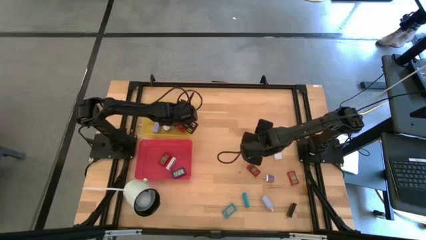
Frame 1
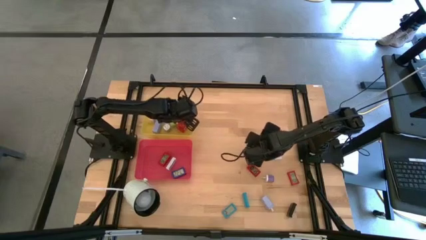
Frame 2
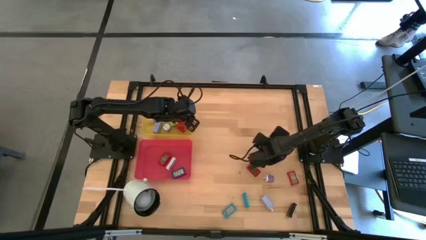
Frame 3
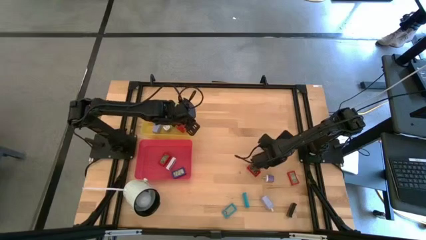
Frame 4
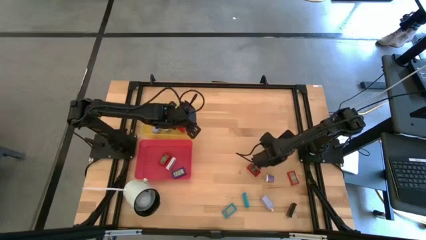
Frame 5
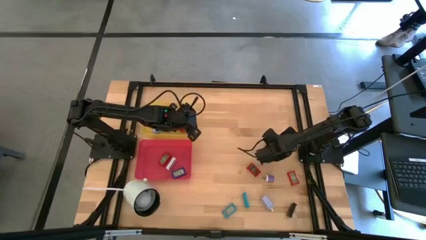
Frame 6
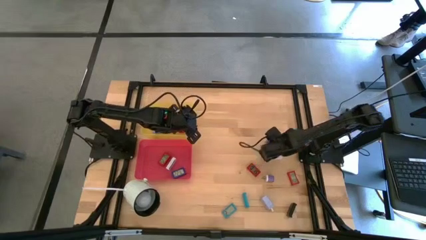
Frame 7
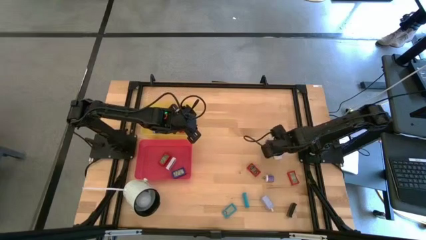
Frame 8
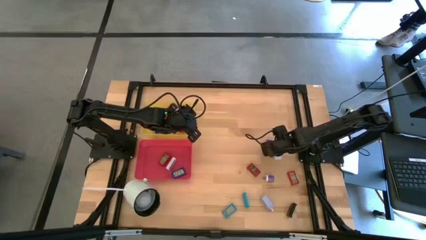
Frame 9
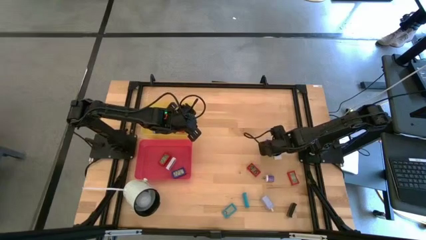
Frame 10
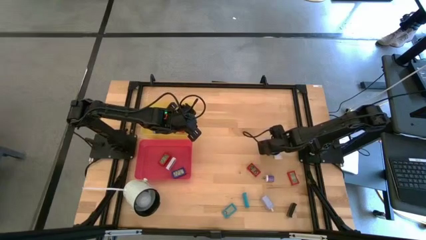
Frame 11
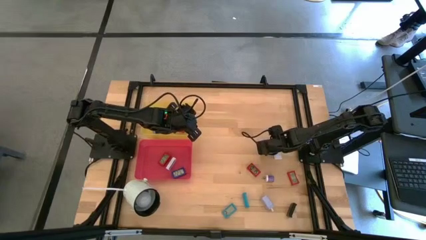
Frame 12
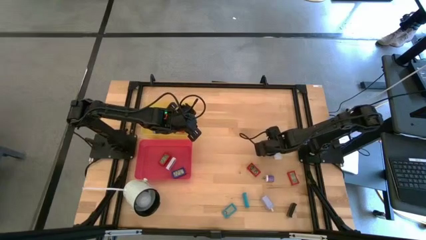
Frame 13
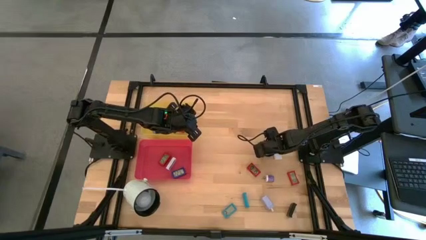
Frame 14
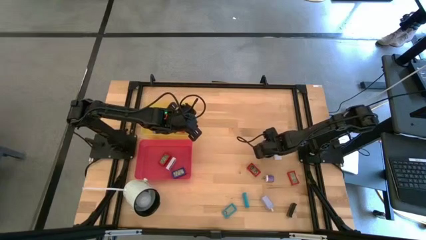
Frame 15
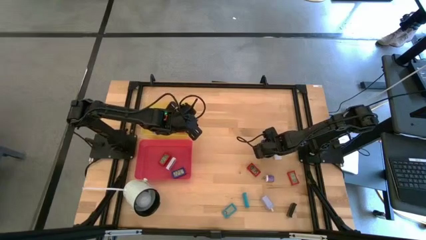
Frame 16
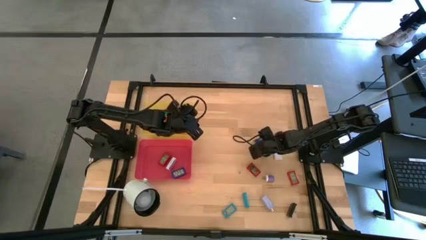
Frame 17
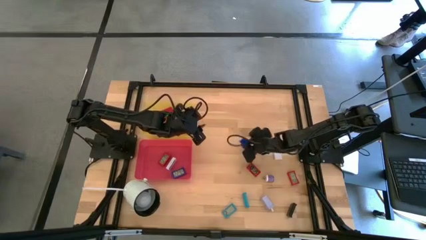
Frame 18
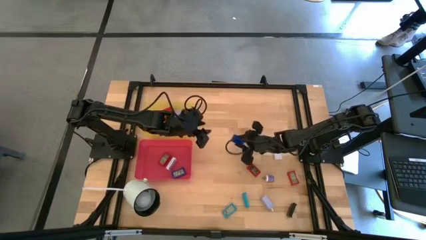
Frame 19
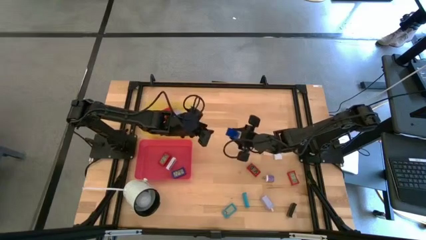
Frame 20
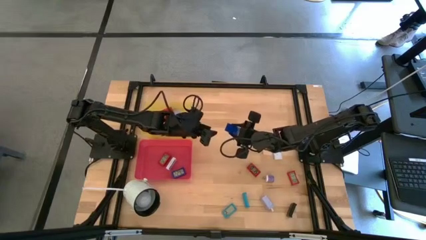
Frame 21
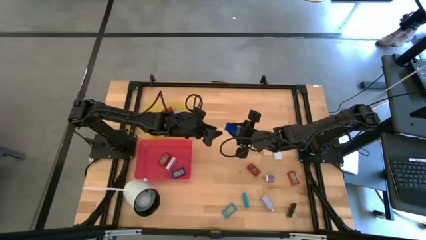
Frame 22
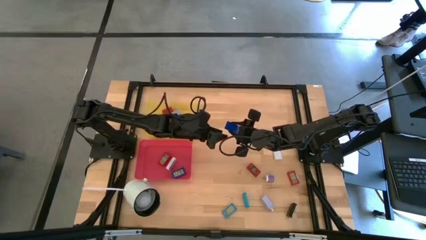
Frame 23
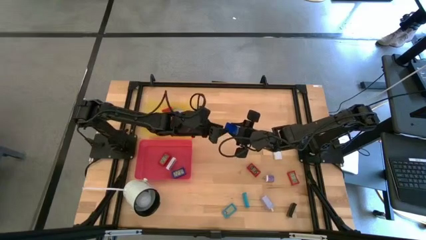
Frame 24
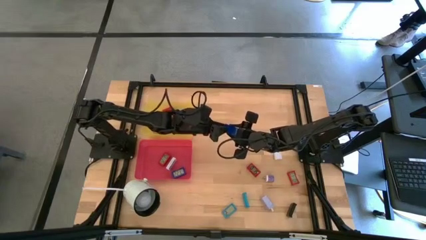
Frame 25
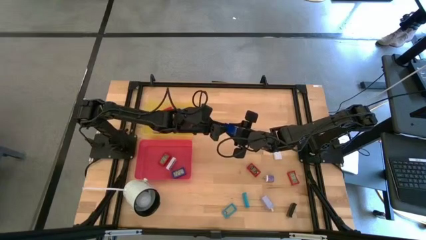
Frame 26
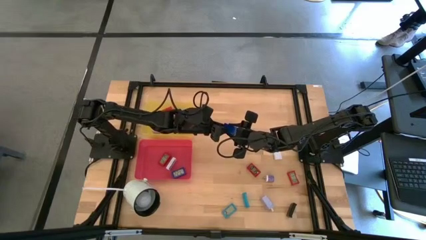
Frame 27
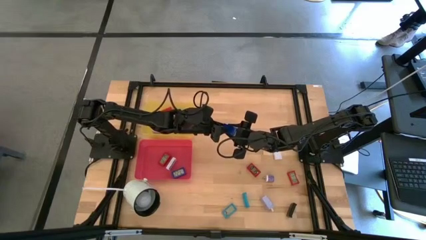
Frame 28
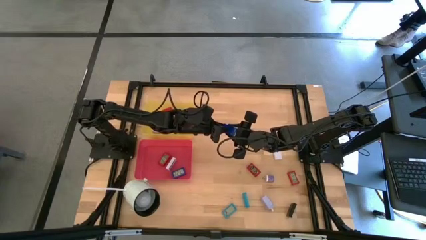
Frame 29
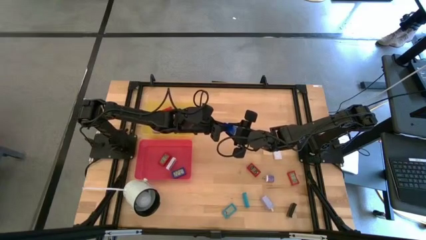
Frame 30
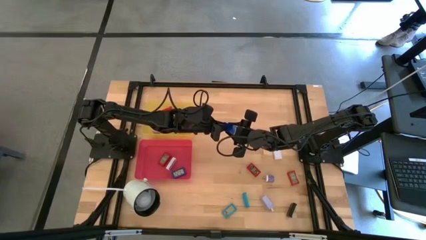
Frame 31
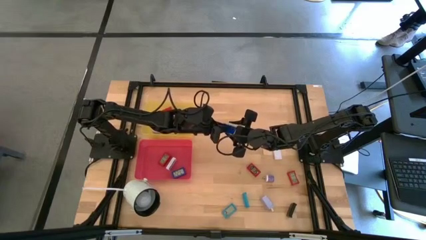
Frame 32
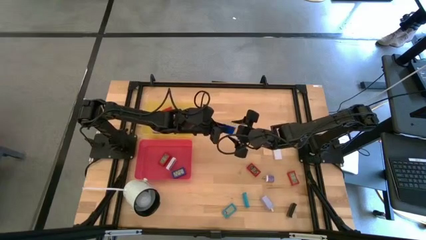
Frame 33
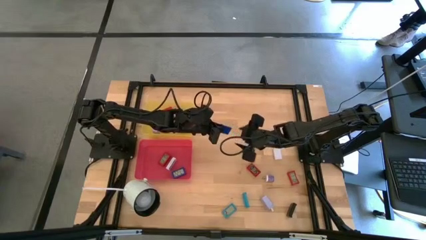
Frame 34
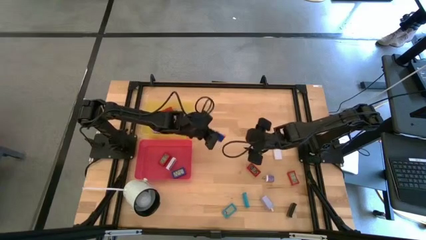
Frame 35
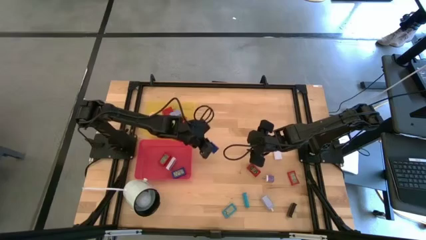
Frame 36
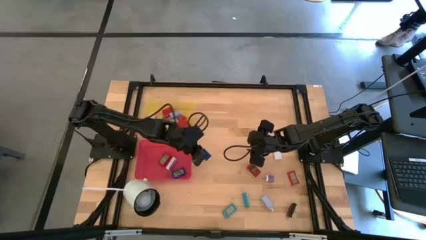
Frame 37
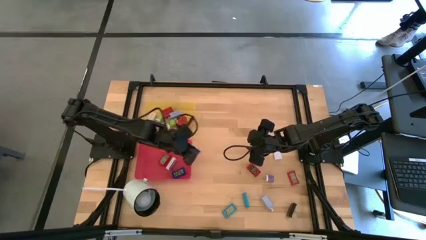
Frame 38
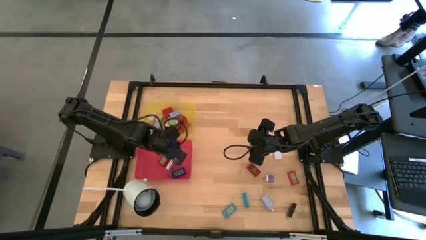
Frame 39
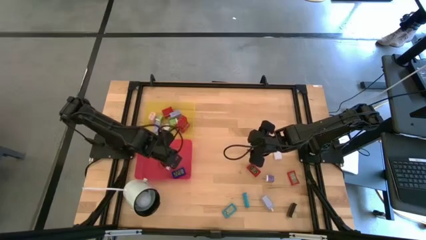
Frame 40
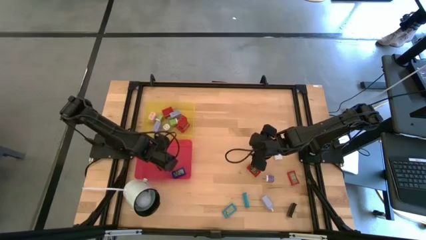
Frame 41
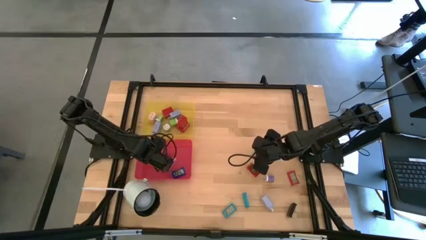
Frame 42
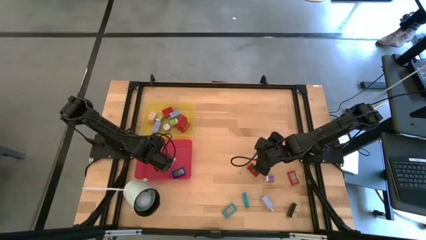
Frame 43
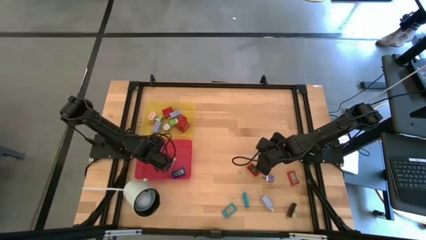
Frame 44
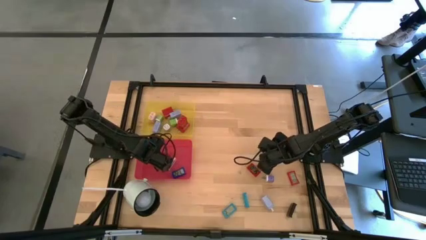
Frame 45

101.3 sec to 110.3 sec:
Task: Pick & Place Office items
Put the blue timer into the red bin

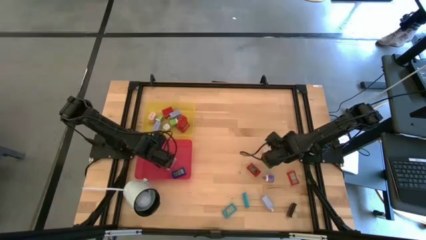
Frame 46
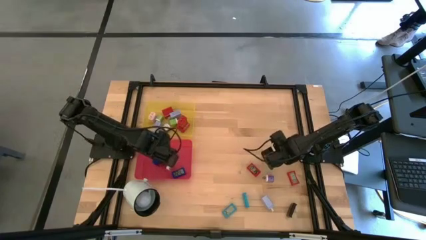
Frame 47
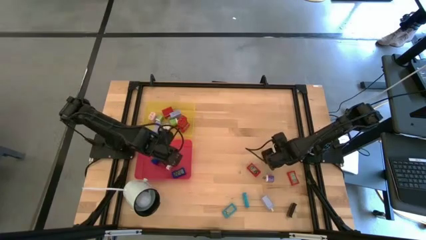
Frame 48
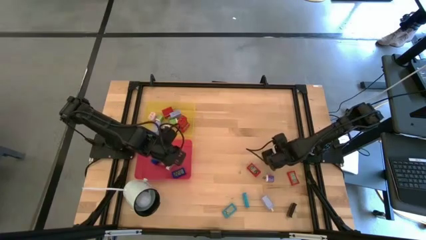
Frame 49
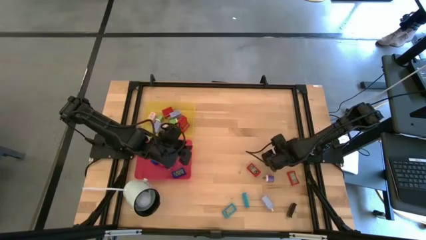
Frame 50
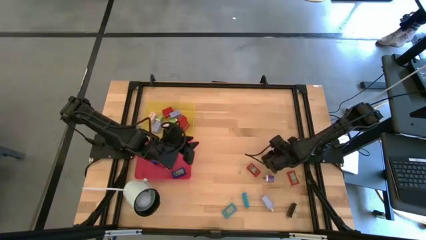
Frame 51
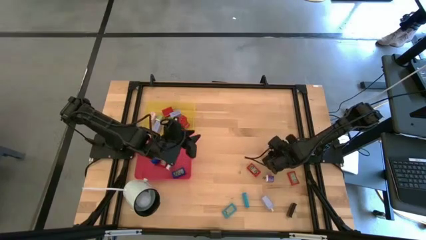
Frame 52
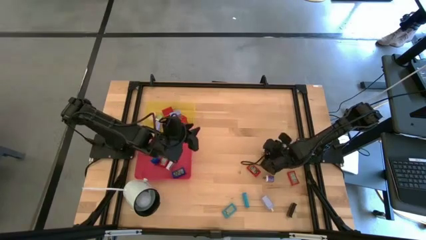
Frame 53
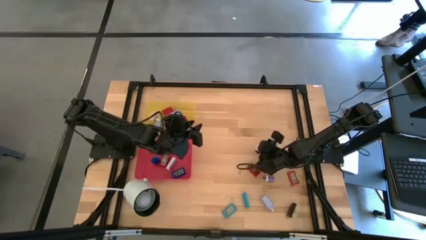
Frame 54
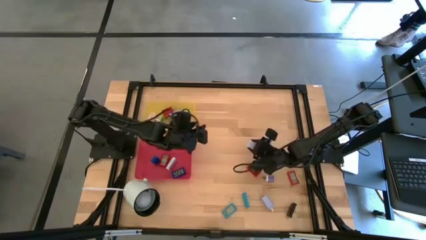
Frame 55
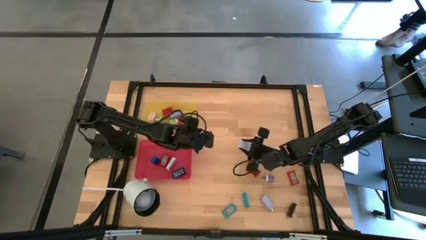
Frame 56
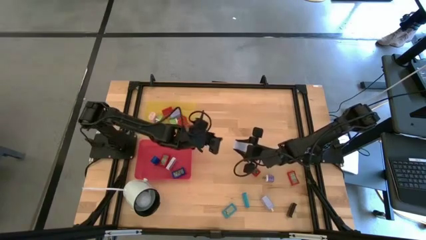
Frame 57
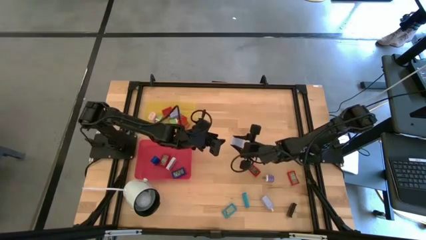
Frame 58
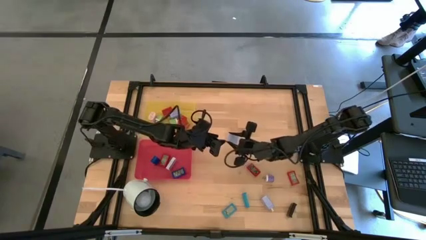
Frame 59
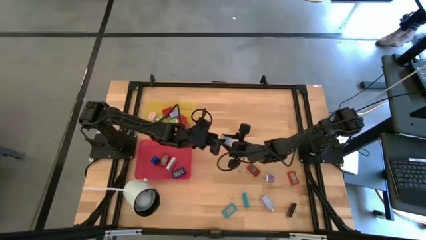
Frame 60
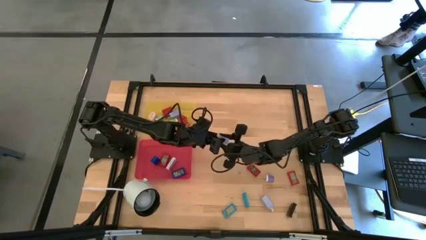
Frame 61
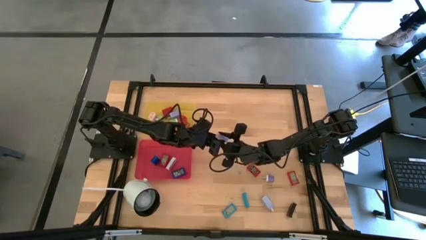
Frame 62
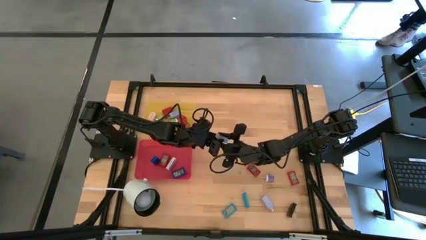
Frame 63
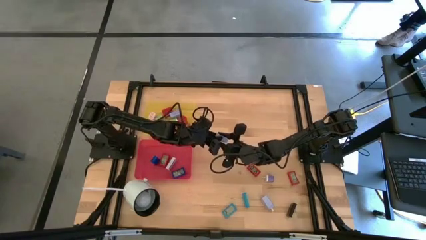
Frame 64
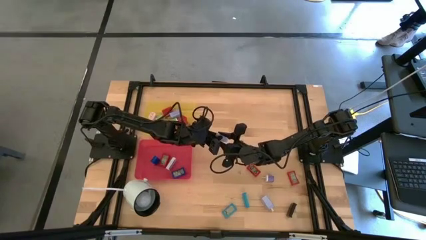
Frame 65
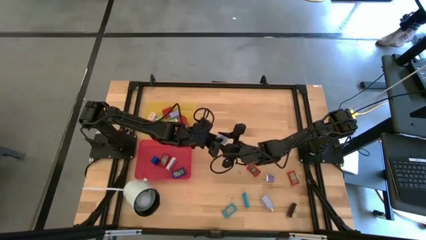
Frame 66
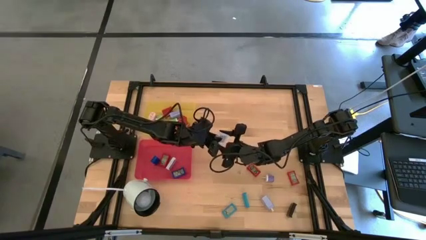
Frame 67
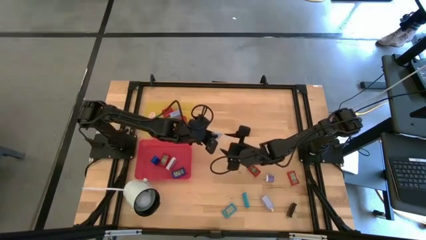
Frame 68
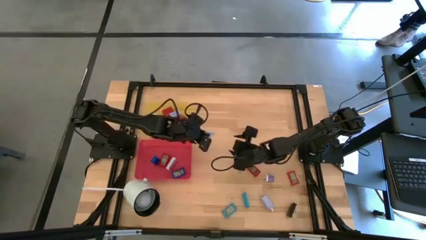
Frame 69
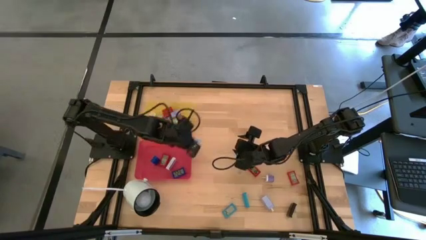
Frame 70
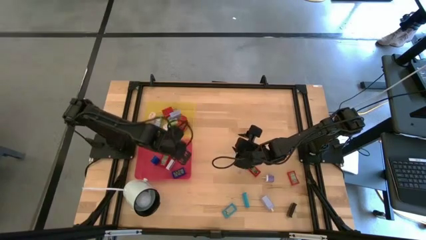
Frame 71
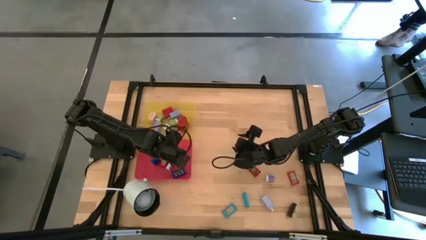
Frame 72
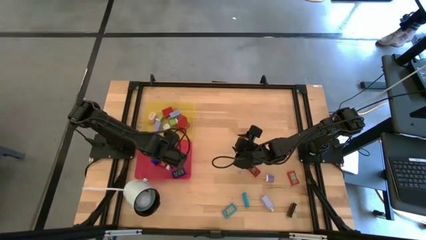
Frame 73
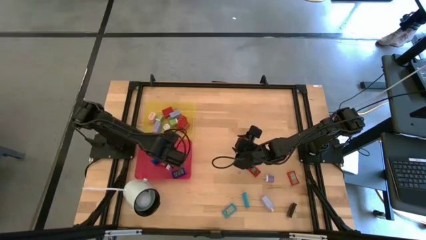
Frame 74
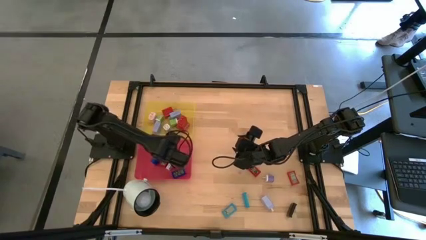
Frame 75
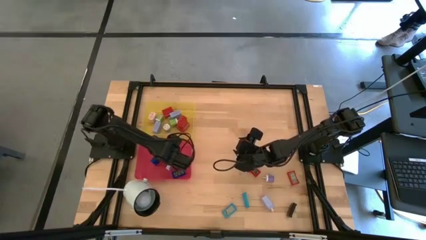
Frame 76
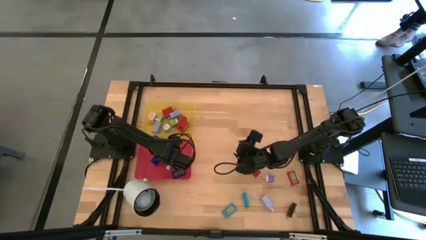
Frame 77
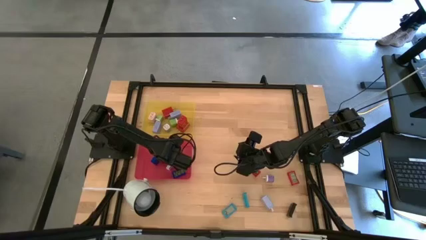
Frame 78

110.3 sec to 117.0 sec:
Put the white timer into the red bin
